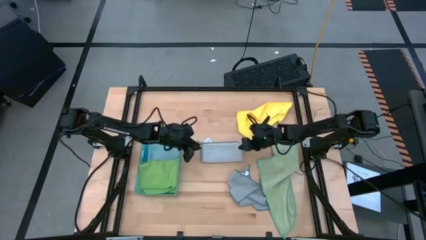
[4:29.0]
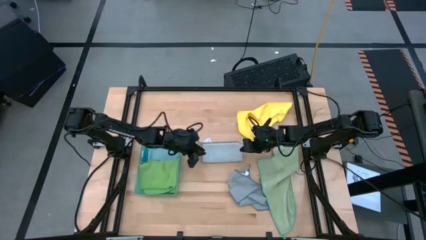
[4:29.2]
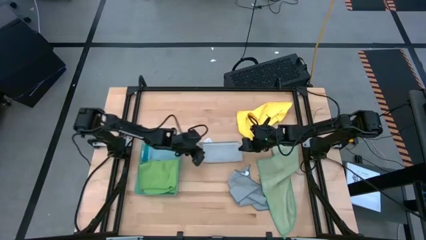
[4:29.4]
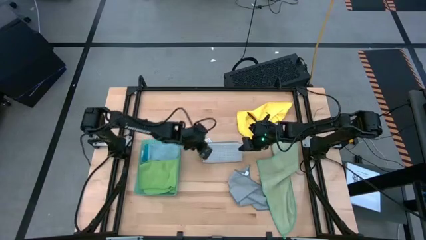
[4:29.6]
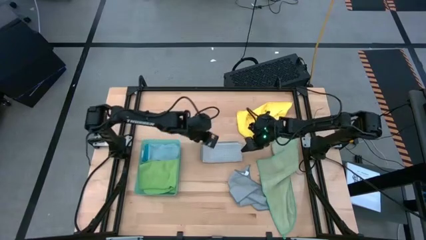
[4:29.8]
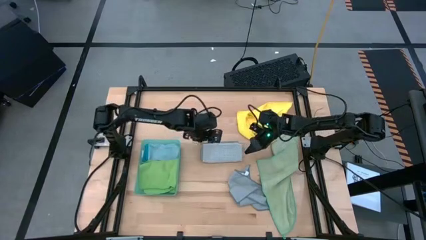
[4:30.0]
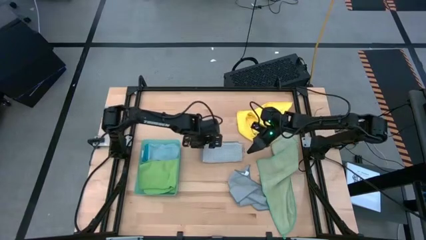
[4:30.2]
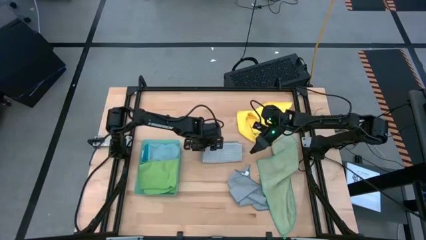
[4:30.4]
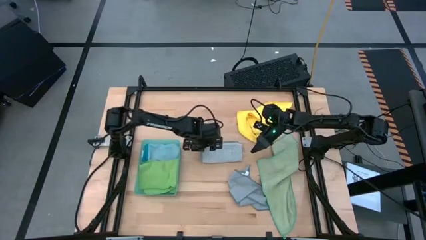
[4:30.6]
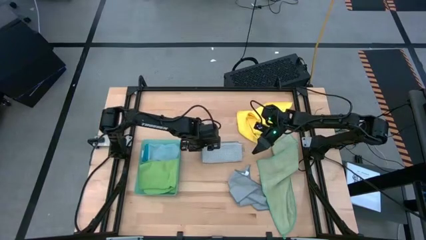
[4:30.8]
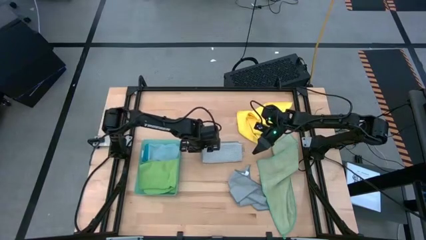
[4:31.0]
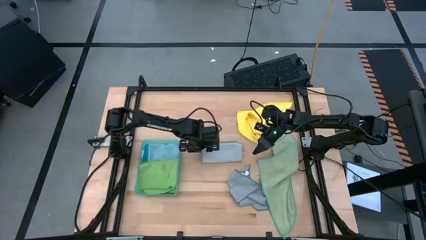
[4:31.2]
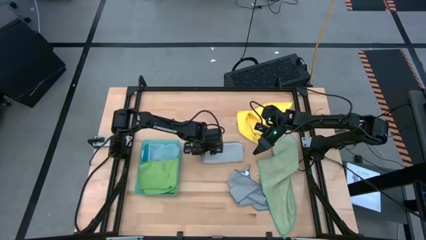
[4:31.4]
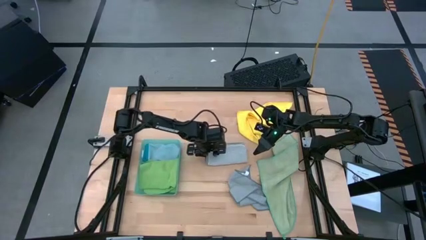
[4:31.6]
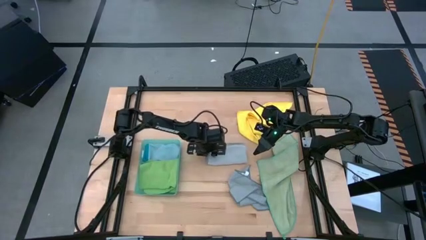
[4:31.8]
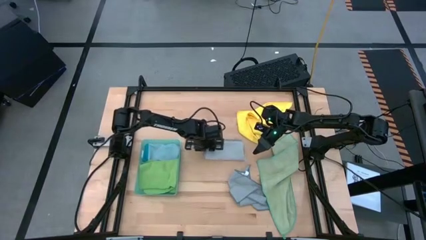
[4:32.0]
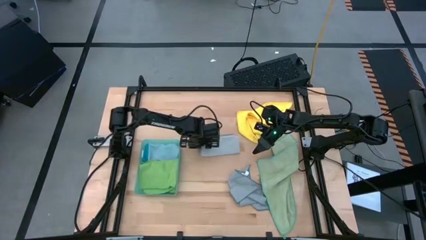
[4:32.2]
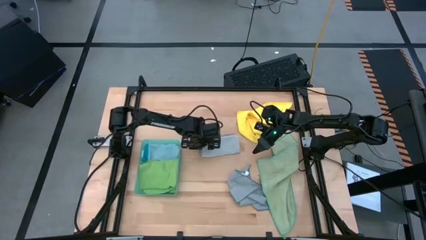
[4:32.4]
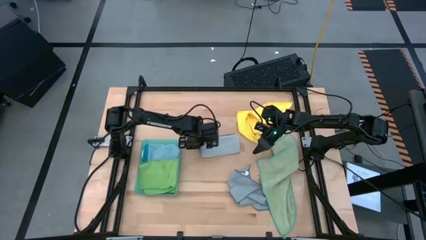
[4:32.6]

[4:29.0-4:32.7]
Task: Fold microfiber towels
Put the top gray microfiber cloth into the green bin

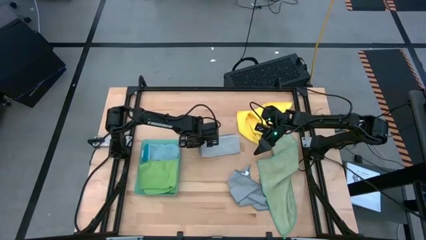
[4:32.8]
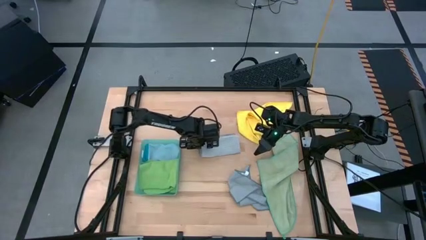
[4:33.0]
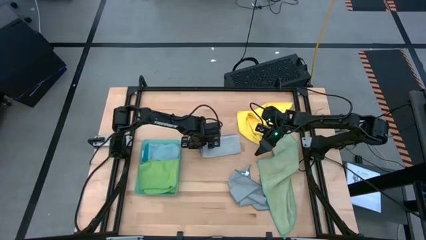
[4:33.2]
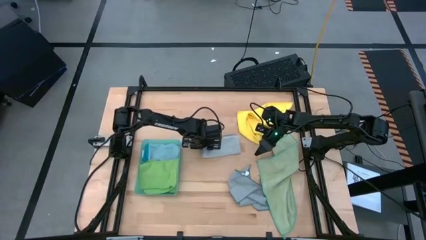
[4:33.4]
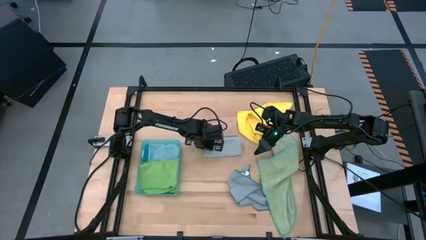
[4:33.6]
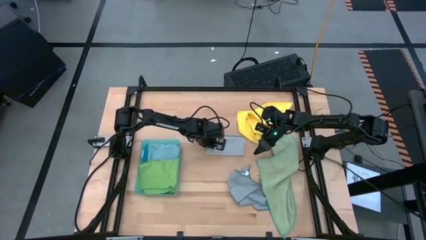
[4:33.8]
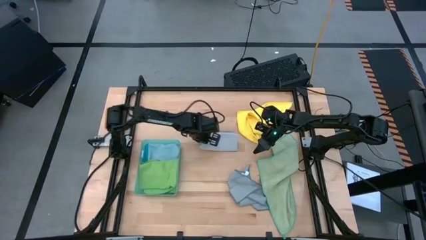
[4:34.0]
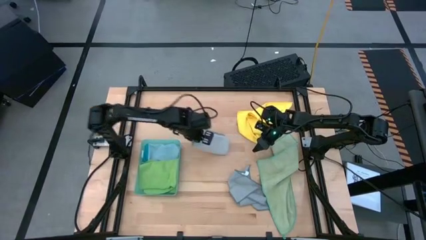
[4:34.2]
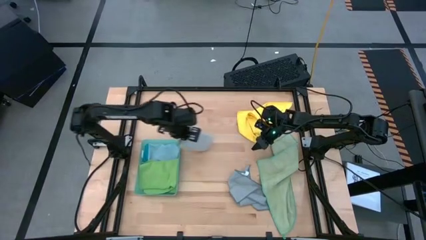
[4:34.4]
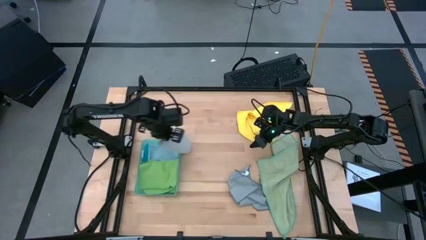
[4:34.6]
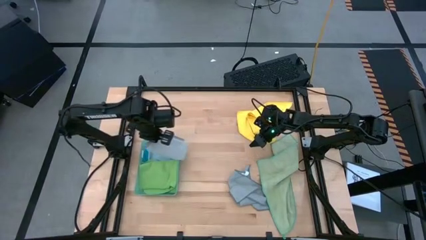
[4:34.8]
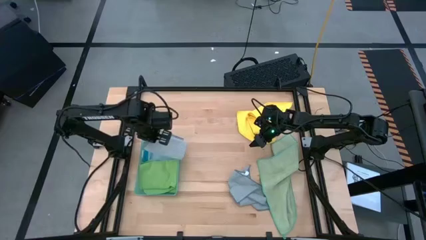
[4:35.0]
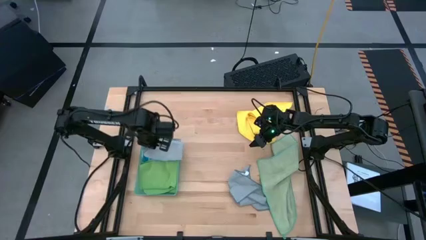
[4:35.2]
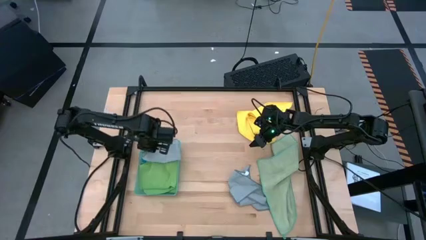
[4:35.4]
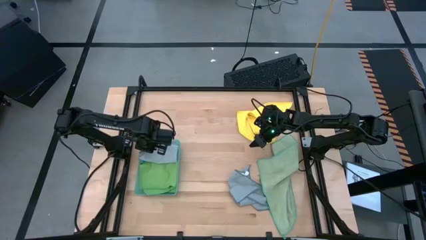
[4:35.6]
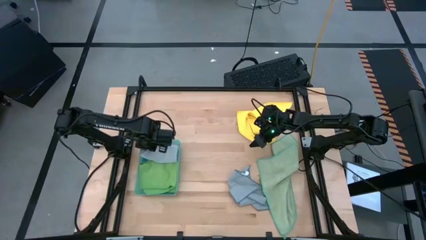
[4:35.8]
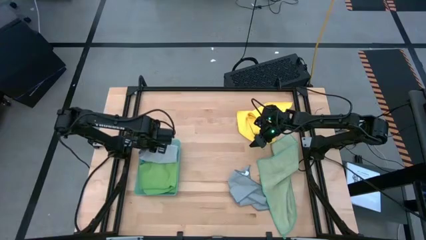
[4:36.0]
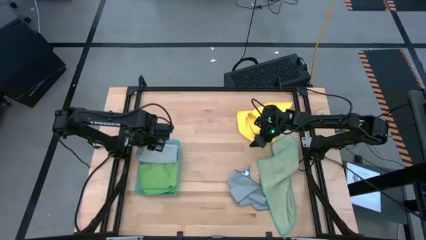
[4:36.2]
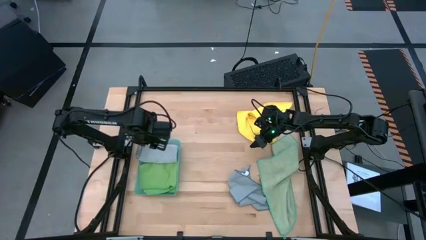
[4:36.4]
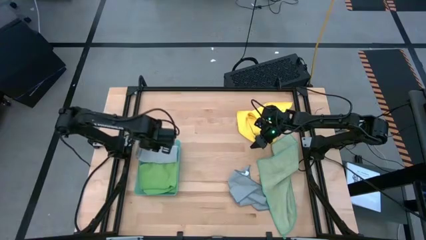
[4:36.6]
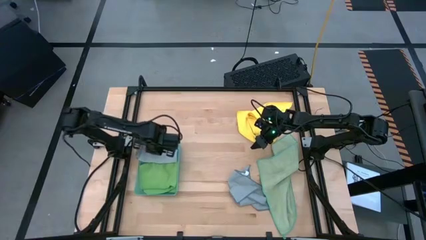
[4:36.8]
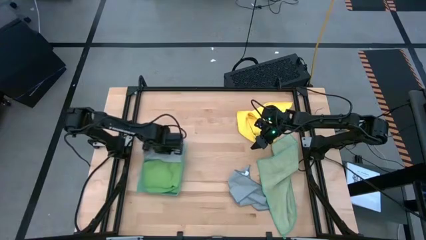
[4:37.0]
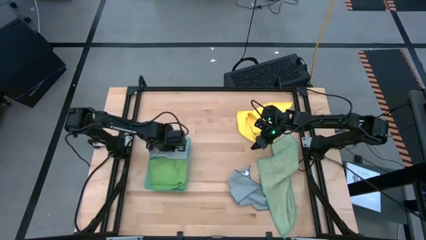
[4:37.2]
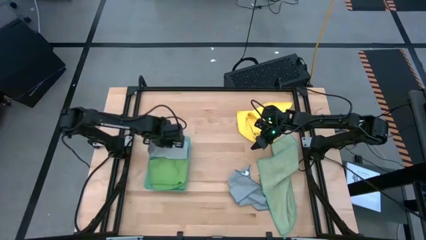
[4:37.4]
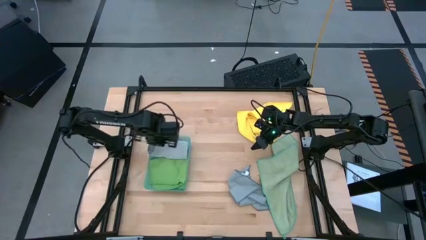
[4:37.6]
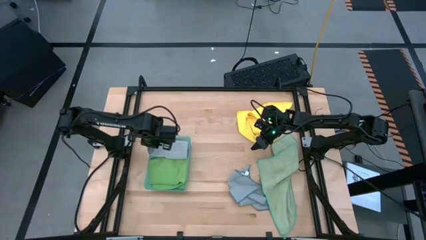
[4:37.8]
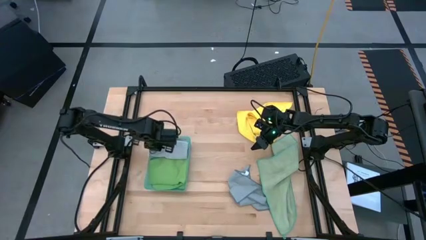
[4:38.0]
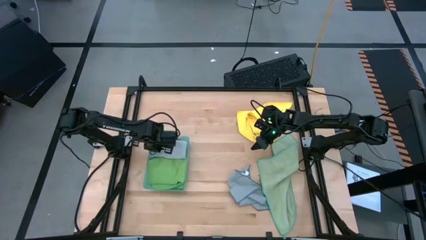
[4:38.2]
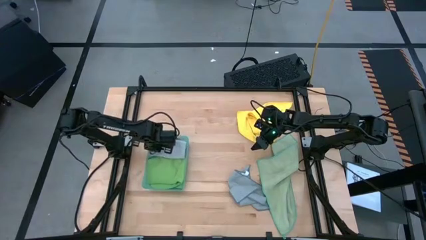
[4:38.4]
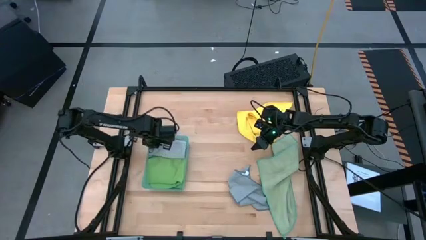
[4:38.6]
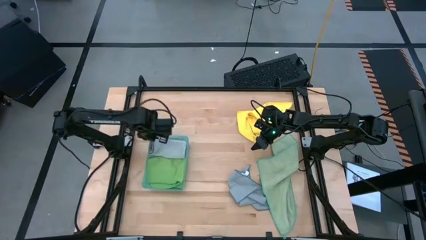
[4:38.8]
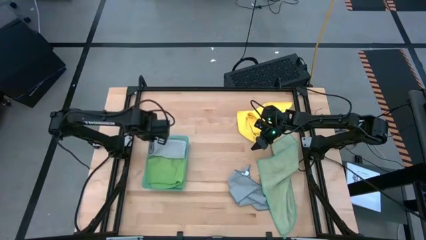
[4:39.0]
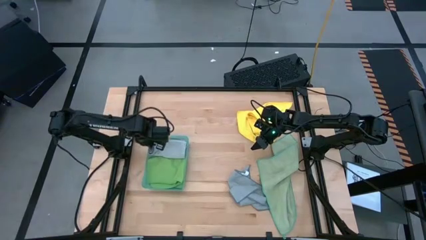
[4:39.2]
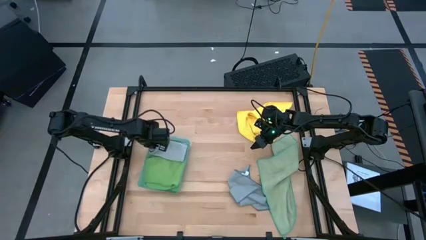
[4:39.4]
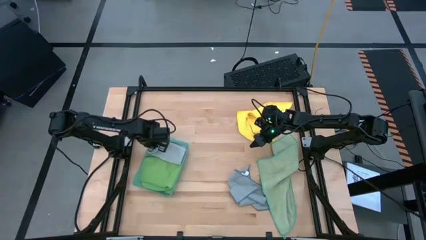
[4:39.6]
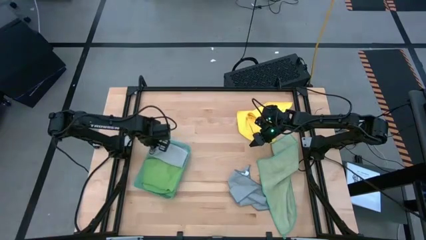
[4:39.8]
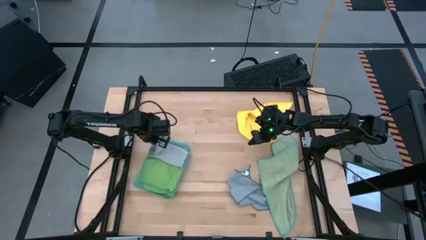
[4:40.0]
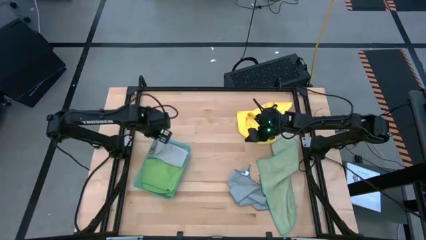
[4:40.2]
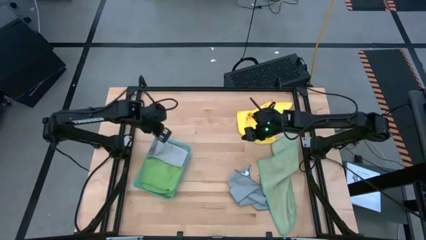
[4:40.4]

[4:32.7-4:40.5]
Put the top gray microfiber cloth into the green bin

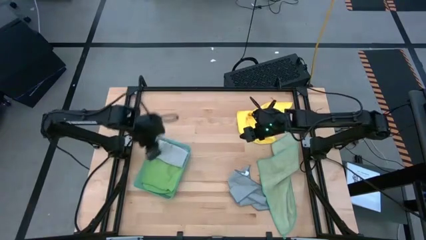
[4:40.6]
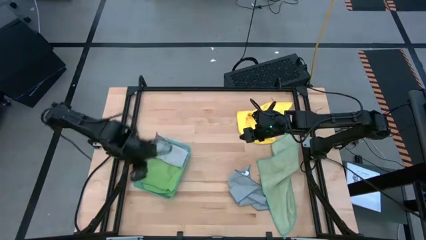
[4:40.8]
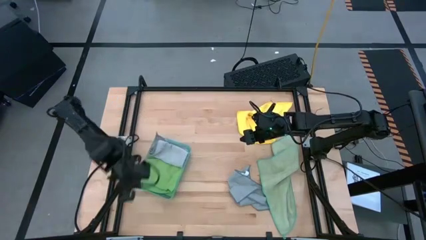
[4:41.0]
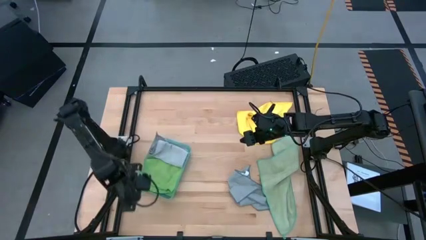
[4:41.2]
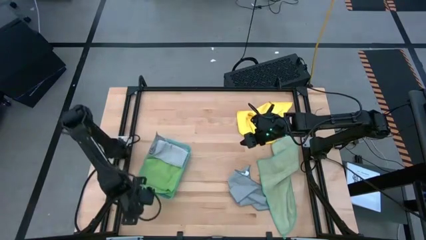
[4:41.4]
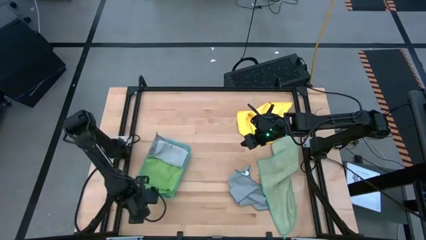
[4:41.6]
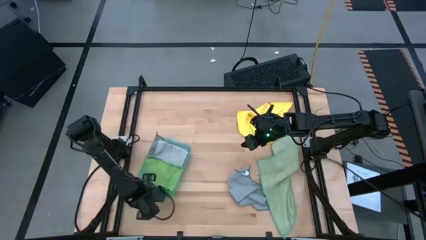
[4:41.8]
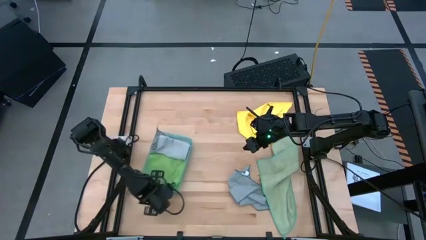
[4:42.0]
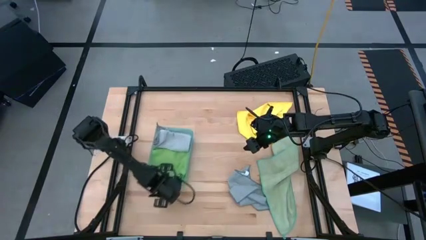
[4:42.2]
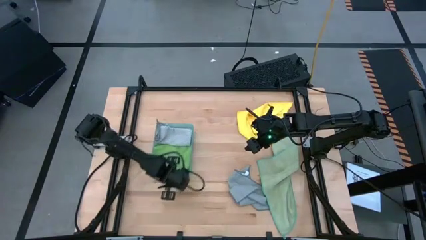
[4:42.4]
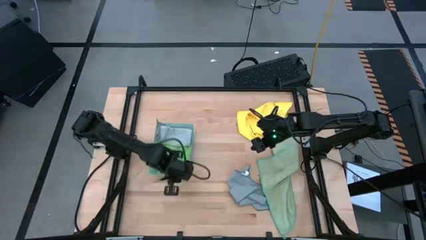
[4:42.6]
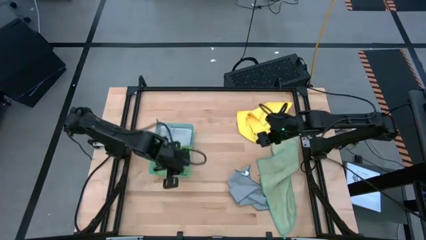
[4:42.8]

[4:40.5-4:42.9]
Adjust the green bin

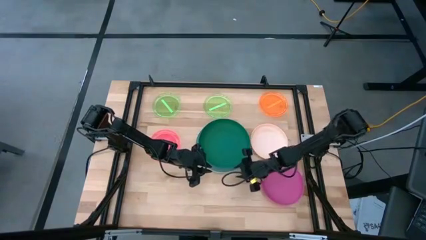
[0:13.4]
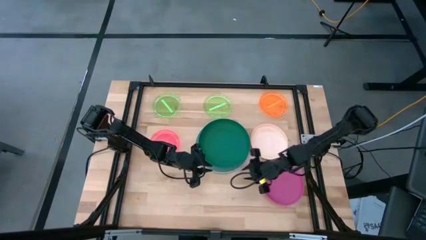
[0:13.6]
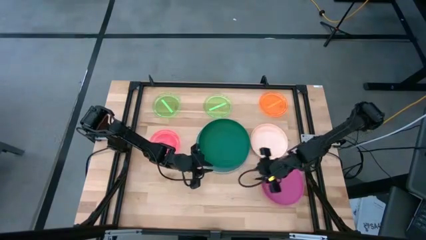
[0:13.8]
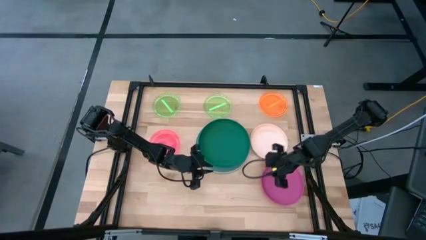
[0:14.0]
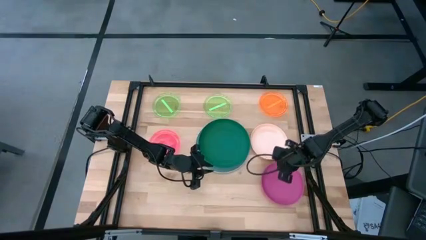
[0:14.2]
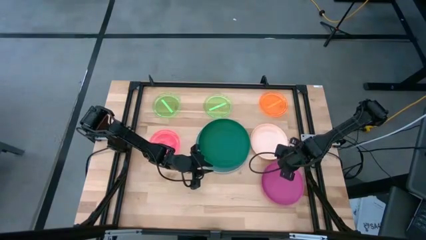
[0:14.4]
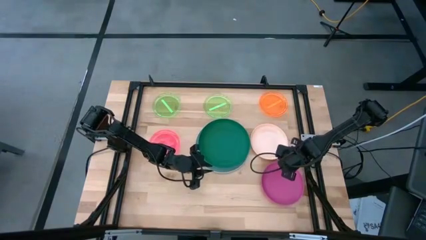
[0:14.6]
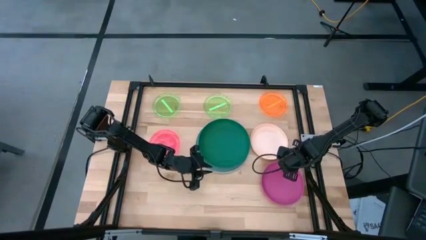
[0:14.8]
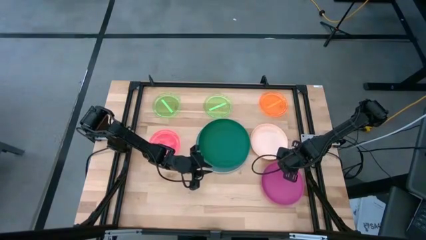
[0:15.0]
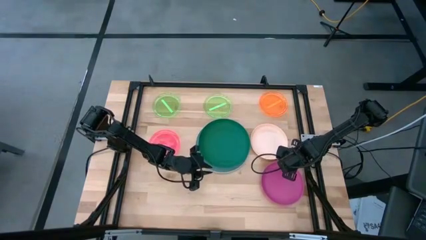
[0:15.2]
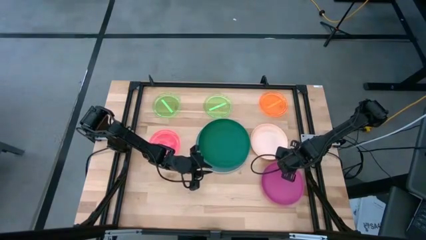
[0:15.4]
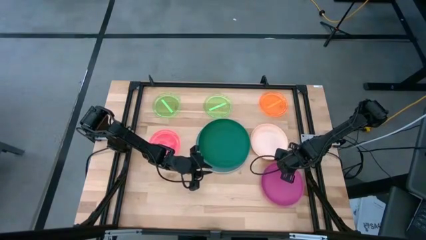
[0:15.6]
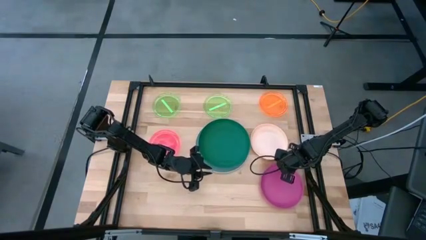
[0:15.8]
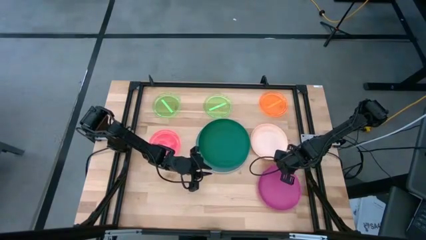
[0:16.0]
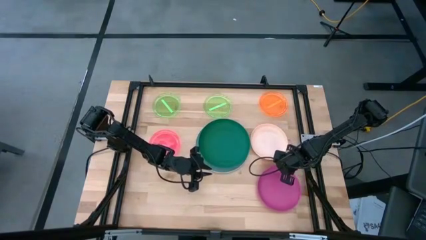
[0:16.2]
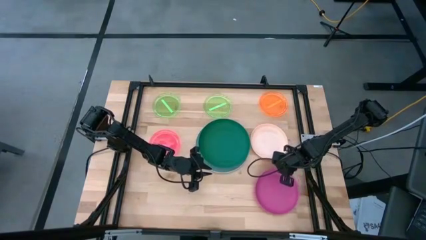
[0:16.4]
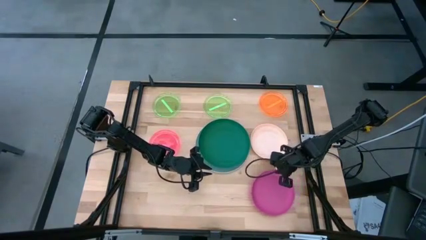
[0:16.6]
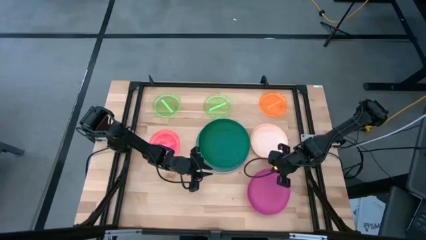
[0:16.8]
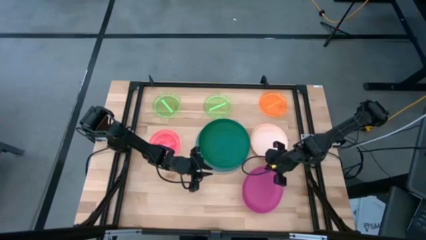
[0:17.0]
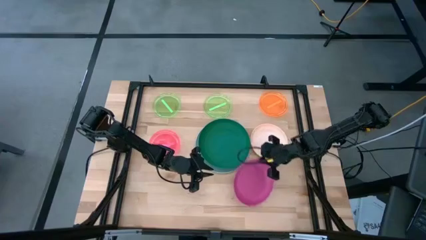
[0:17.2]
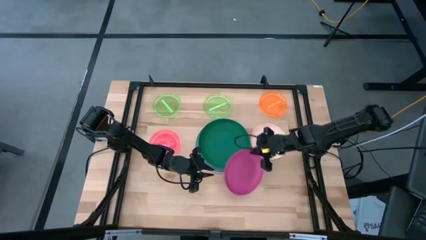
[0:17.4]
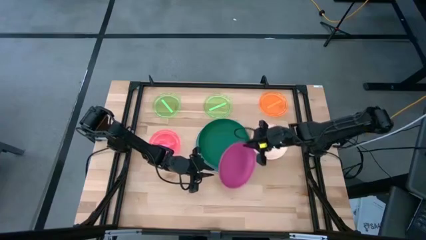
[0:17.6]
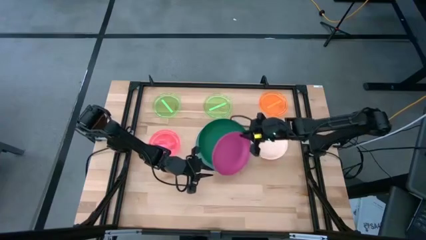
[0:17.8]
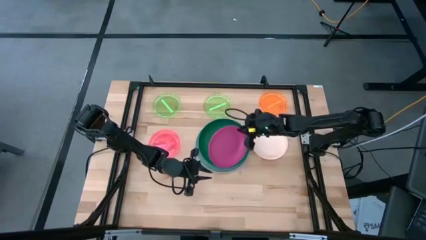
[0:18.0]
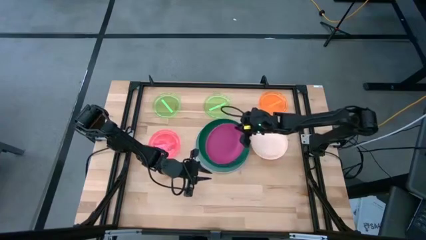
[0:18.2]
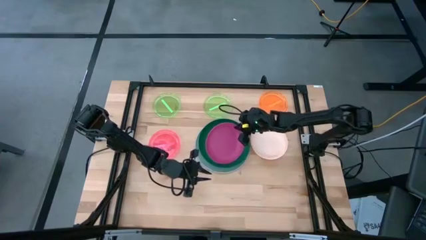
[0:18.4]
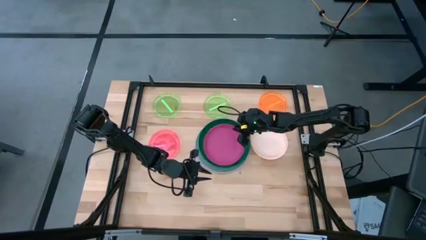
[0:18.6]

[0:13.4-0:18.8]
Task: Stack plastic plates
Stack the pink plate on top of green plate
